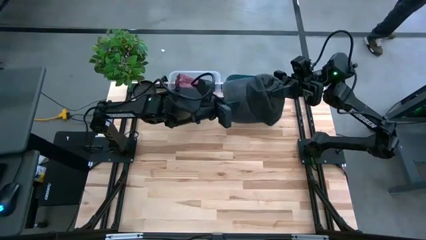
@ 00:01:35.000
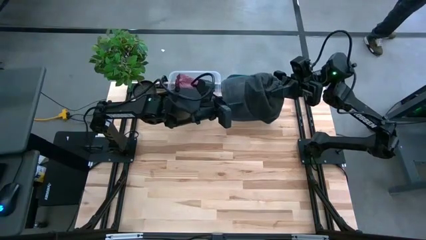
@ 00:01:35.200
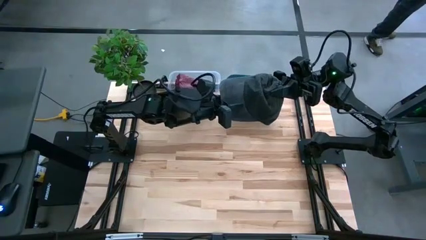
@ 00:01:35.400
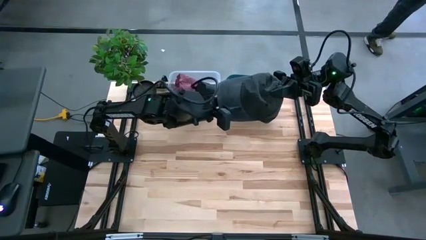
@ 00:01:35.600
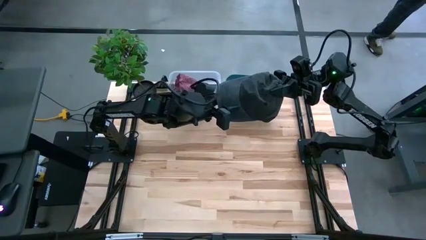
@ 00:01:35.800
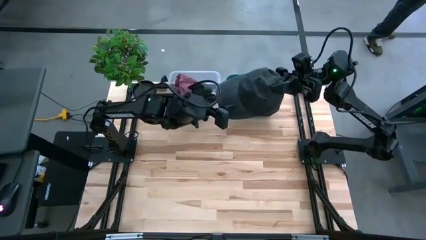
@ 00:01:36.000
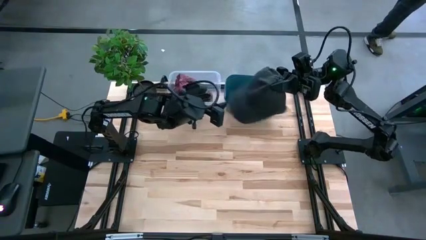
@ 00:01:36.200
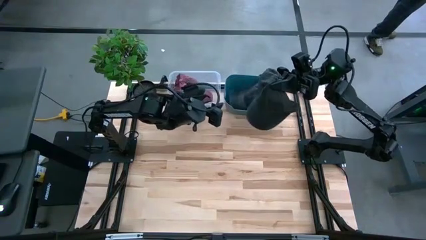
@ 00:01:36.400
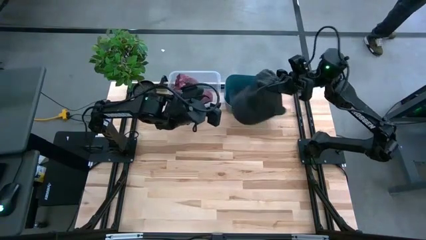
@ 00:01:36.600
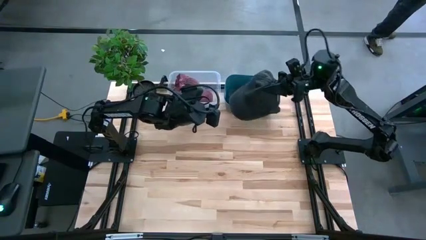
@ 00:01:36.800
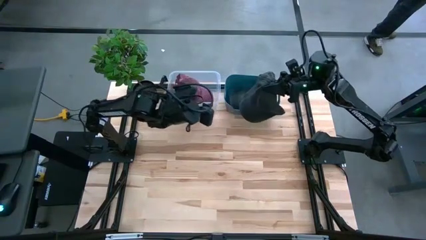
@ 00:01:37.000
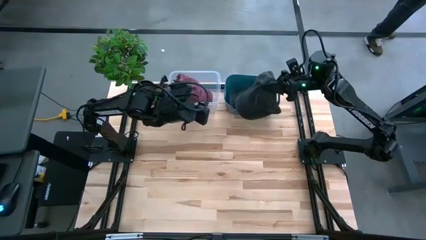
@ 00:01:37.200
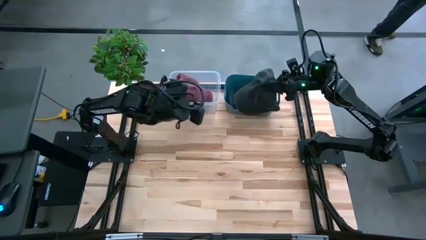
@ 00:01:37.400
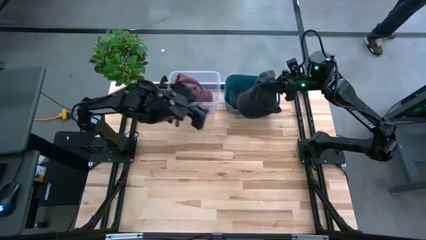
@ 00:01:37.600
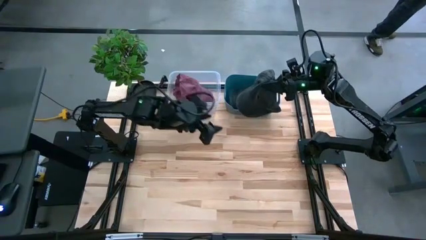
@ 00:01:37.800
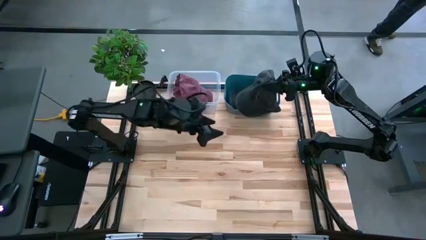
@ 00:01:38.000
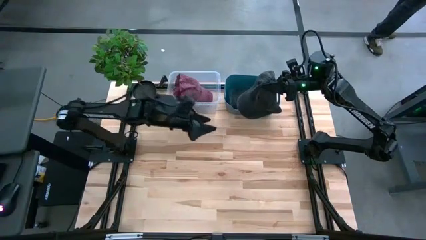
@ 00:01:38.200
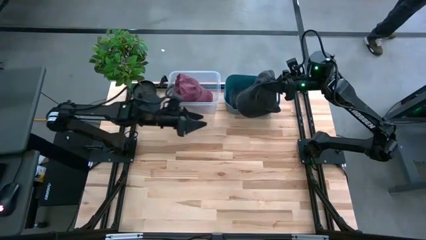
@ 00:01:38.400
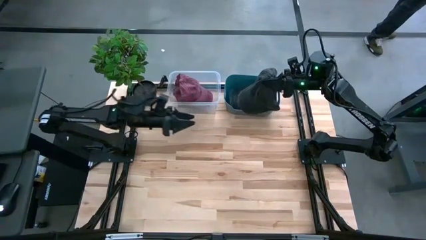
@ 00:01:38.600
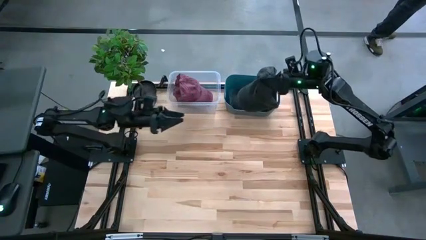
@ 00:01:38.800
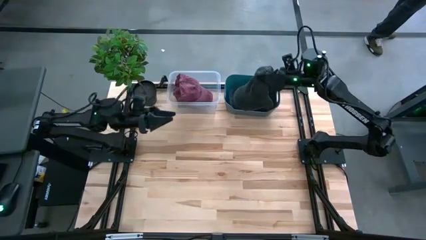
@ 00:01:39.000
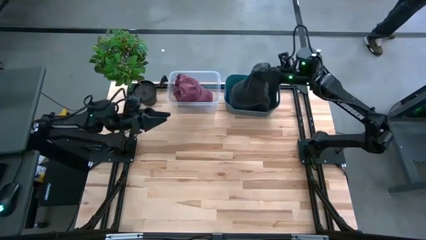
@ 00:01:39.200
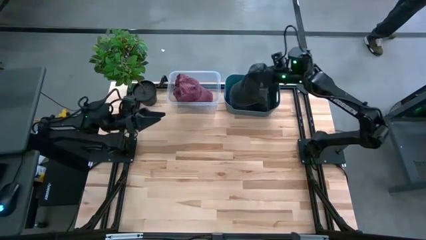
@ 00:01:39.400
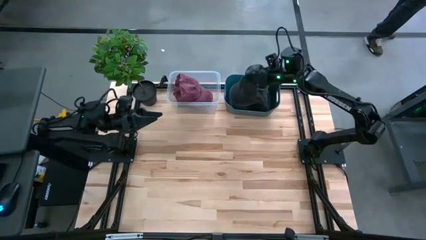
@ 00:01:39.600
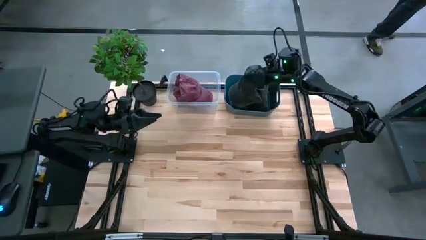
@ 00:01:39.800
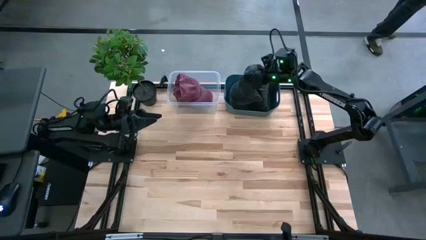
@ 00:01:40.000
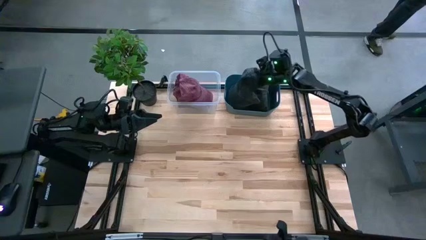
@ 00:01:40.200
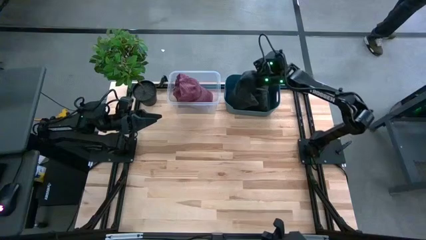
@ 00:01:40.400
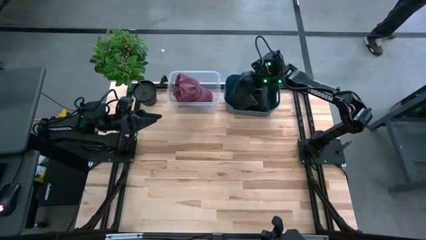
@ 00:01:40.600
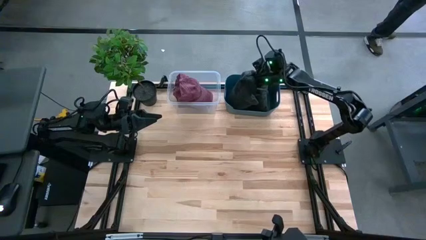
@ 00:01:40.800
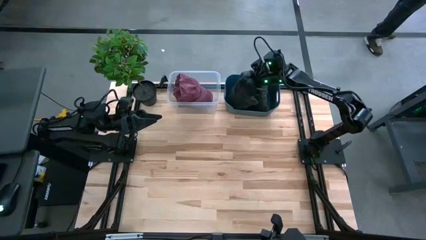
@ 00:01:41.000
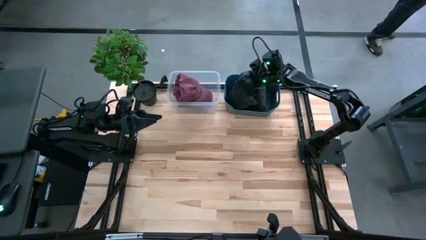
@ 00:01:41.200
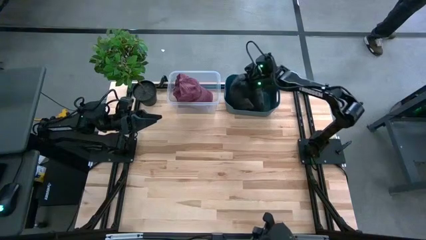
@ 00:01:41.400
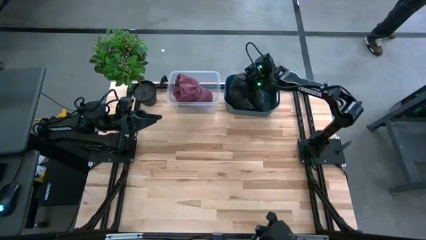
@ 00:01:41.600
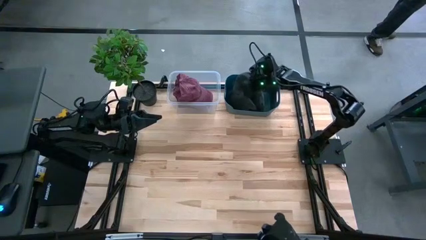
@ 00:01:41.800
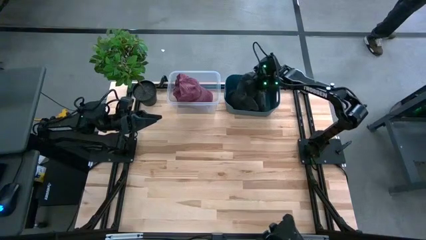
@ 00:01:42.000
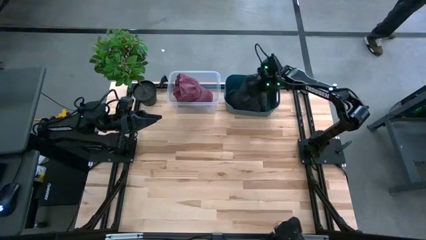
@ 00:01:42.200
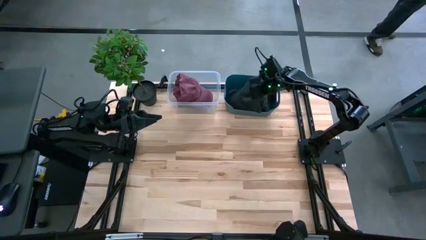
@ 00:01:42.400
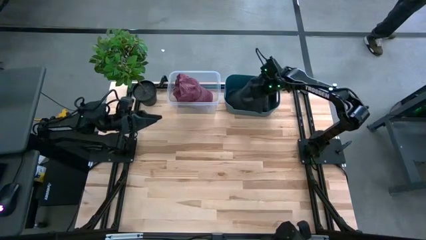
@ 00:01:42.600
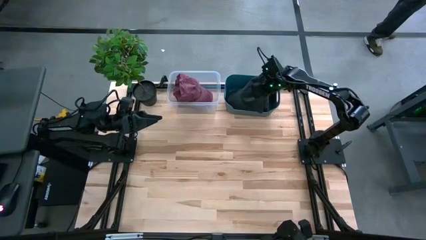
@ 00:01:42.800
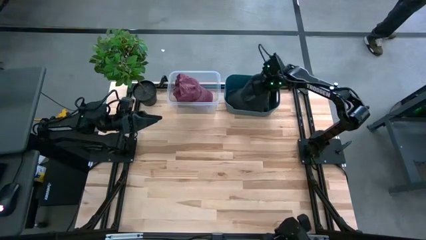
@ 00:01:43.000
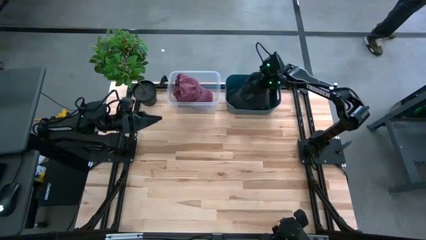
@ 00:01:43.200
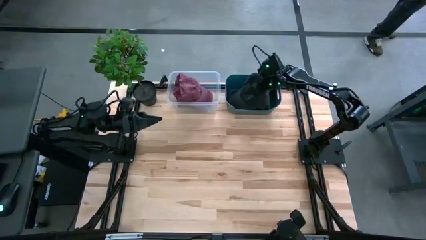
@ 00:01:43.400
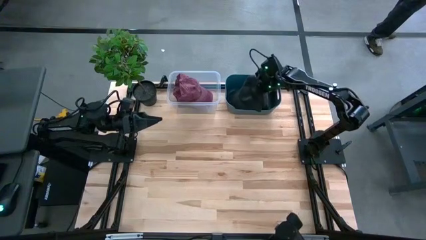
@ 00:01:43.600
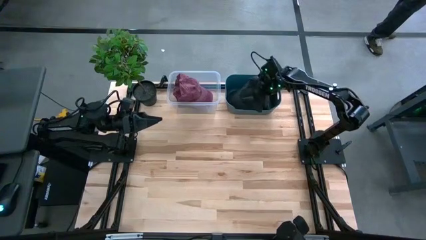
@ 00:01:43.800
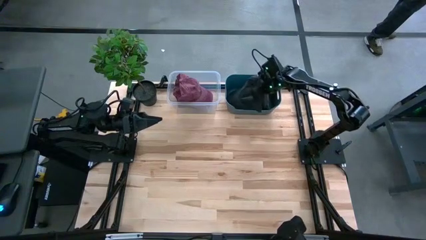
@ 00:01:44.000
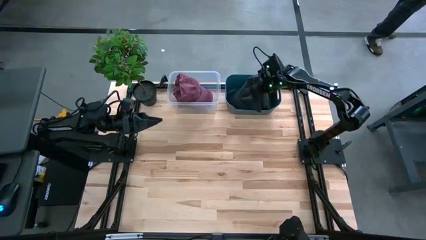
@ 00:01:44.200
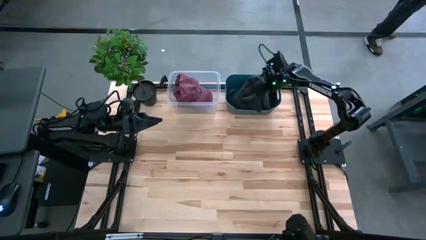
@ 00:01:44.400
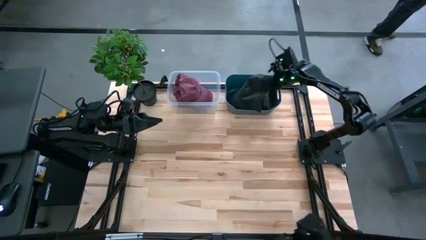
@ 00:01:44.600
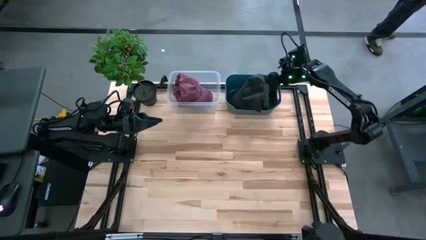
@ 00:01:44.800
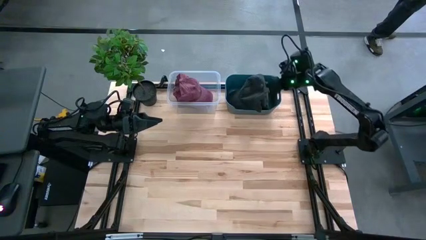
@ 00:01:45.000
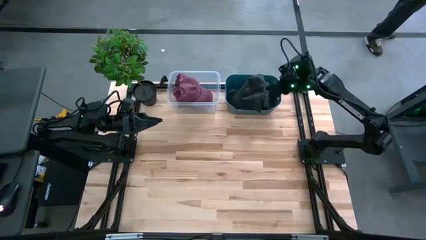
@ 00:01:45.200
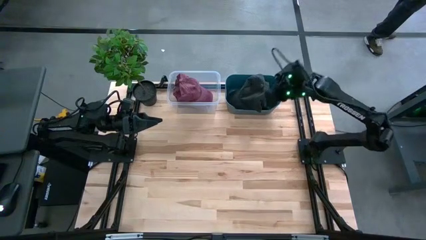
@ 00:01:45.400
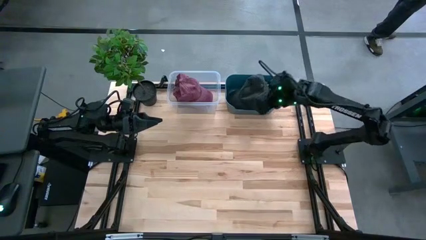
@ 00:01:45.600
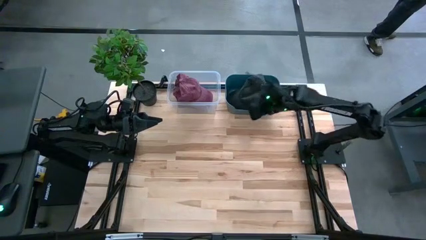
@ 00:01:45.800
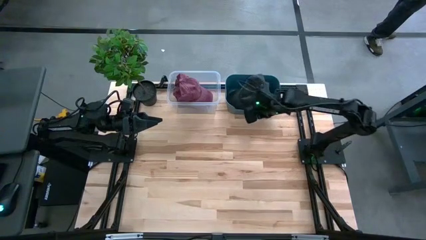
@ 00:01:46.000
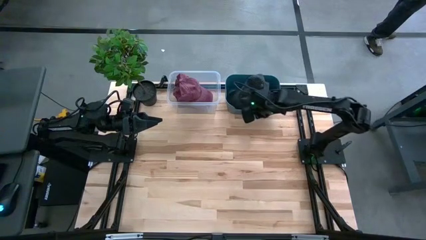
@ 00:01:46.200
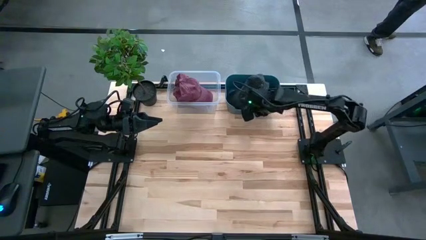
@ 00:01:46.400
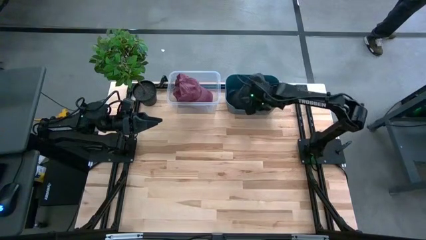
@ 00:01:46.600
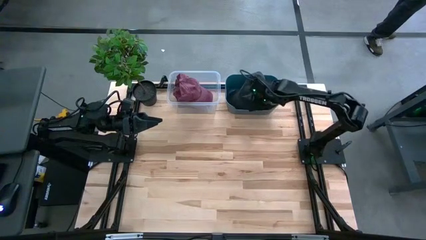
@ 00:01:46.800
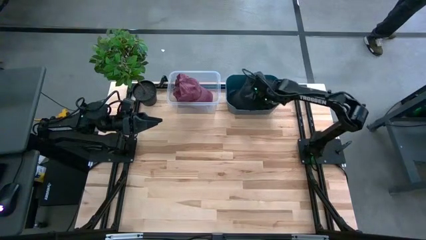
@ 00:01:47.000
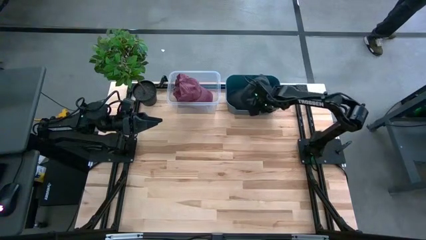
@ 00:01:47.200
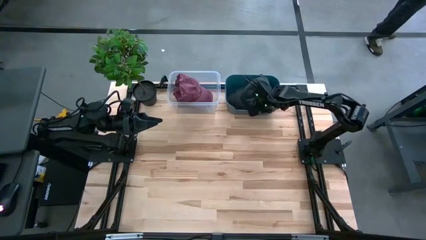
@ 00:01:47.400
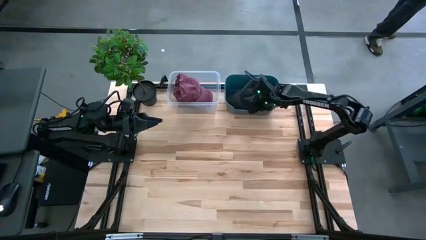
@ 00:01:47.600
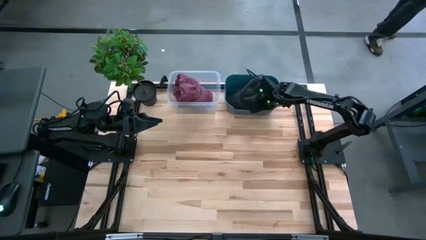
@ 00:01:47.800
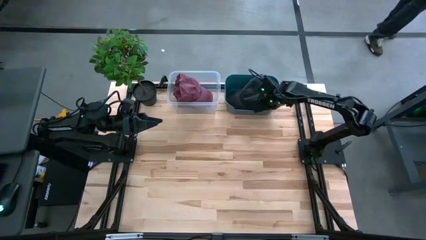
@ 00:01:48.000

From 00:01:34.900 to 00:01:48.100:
Task: Pick & Place hat
Put the black cap into the blue bin
